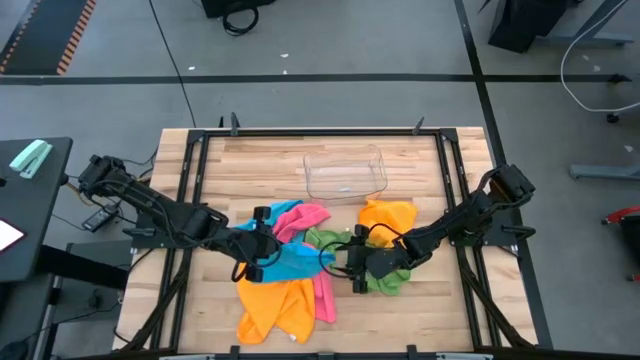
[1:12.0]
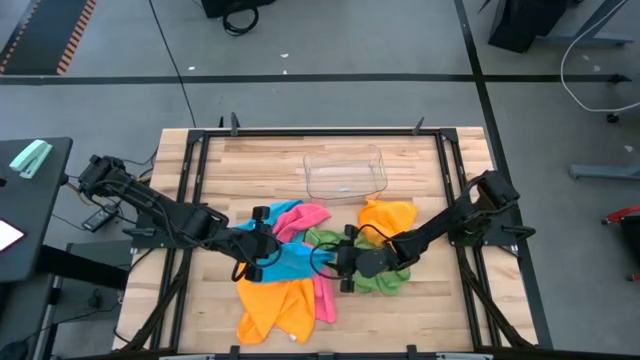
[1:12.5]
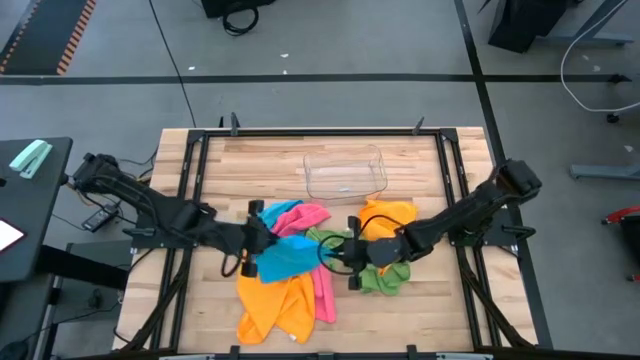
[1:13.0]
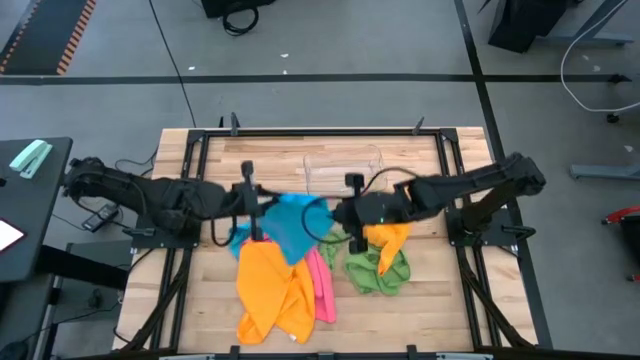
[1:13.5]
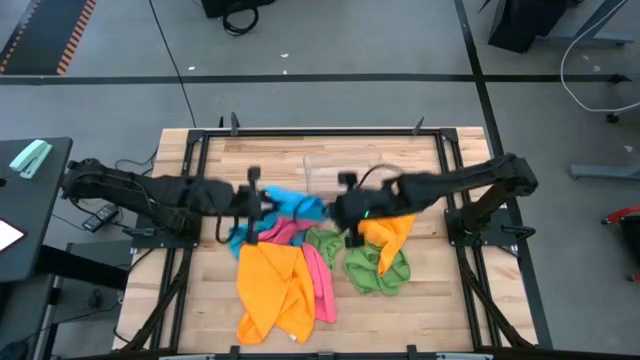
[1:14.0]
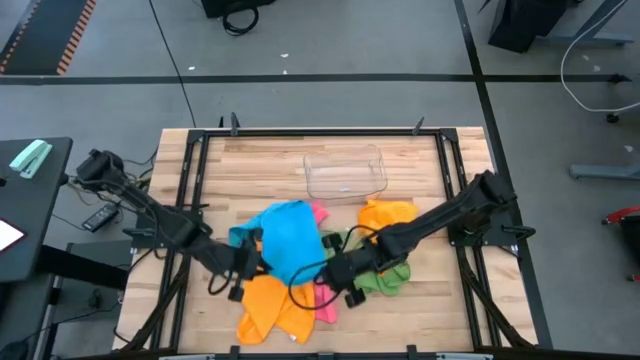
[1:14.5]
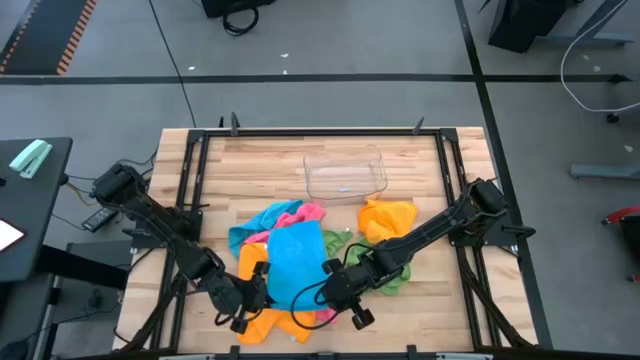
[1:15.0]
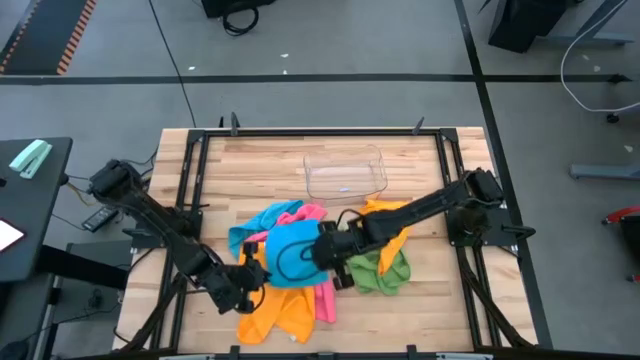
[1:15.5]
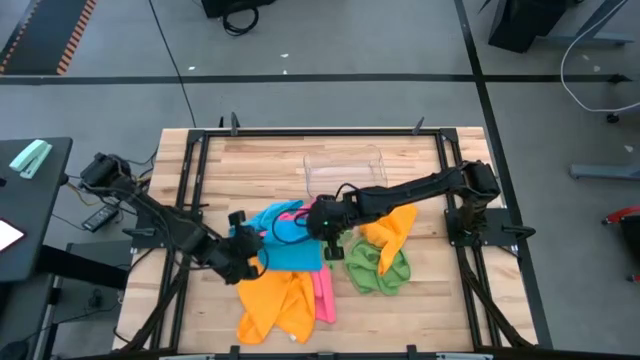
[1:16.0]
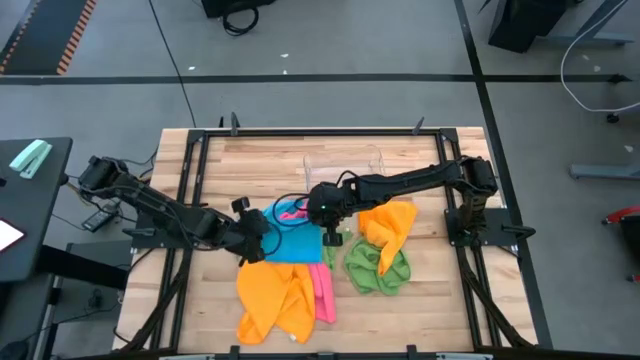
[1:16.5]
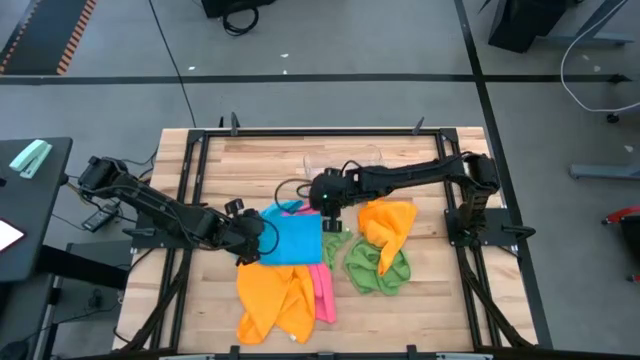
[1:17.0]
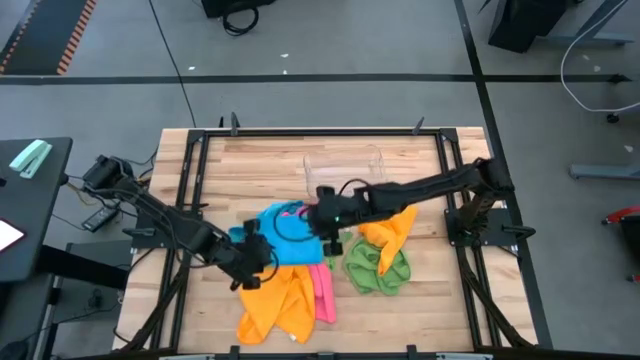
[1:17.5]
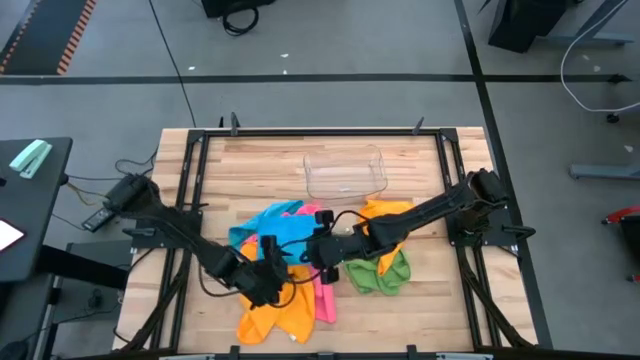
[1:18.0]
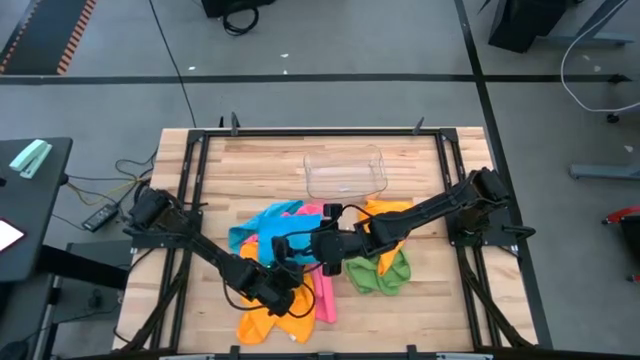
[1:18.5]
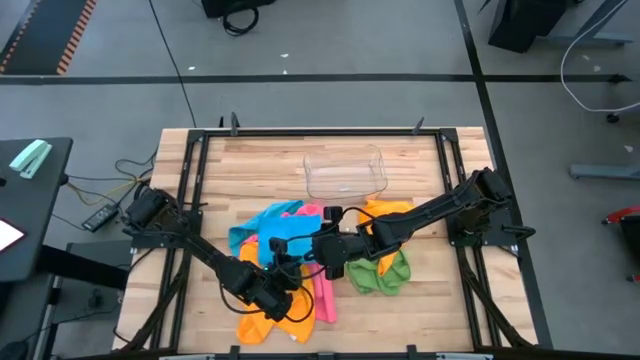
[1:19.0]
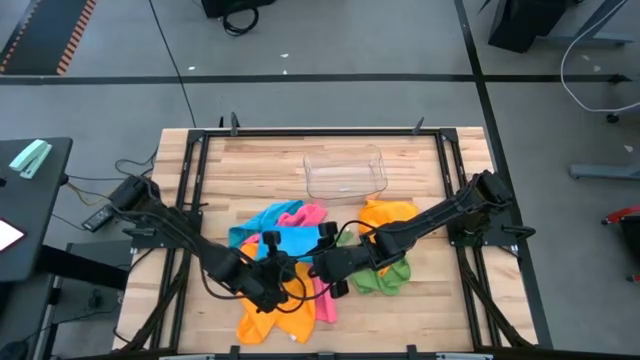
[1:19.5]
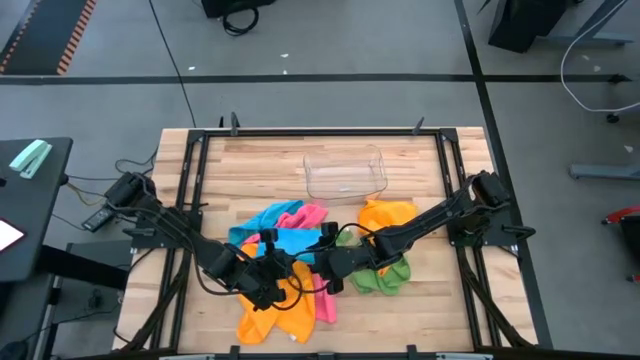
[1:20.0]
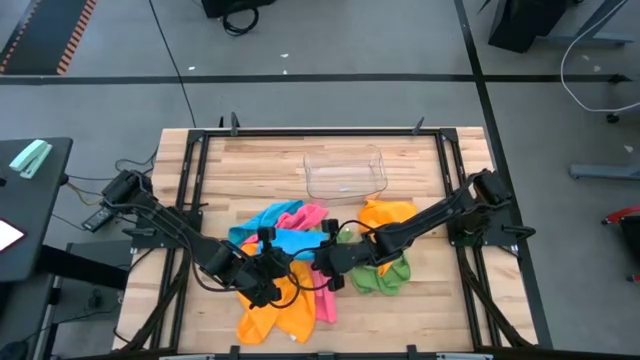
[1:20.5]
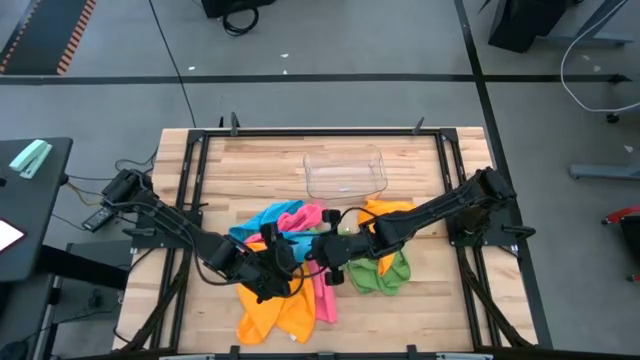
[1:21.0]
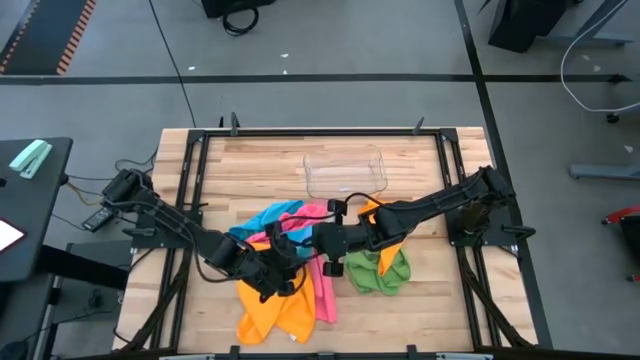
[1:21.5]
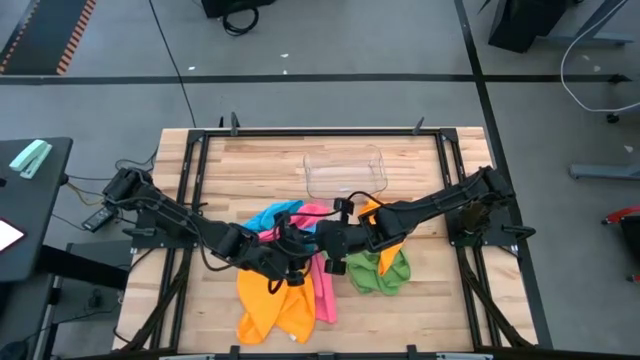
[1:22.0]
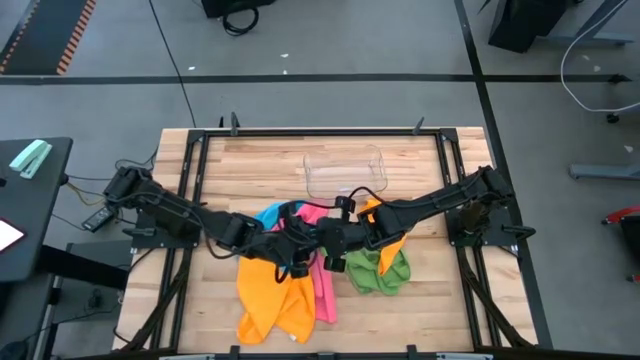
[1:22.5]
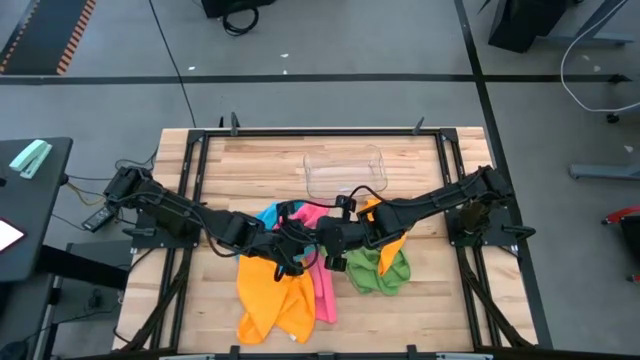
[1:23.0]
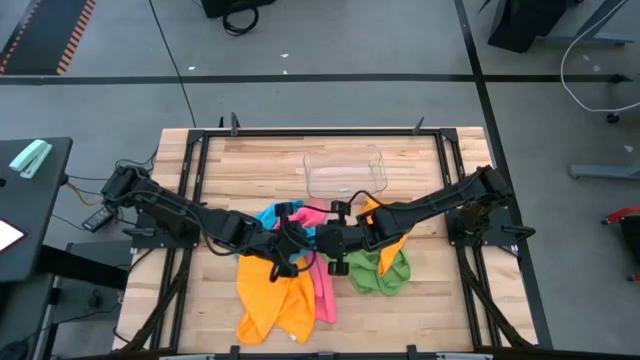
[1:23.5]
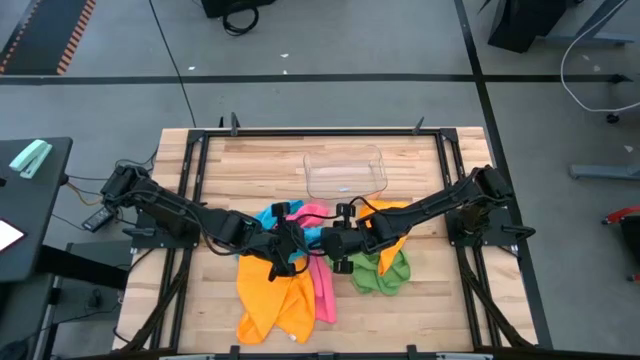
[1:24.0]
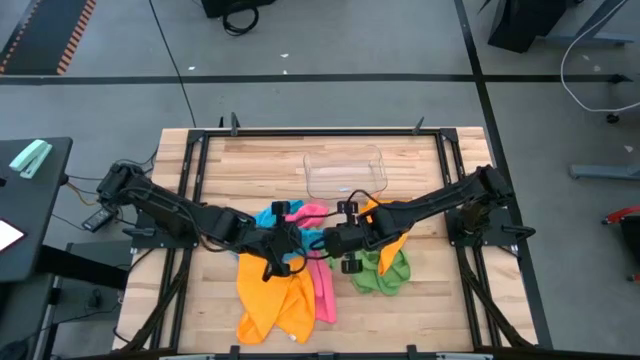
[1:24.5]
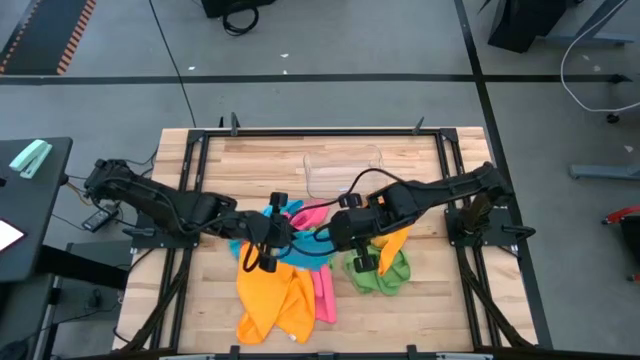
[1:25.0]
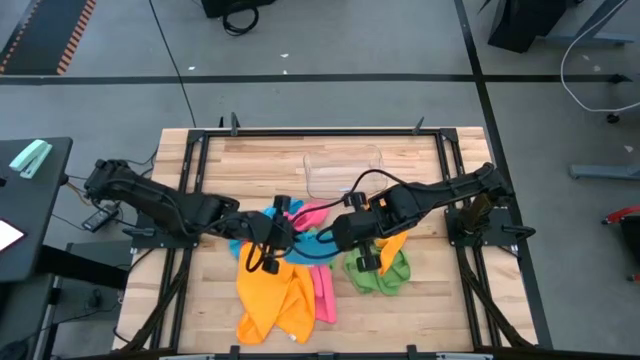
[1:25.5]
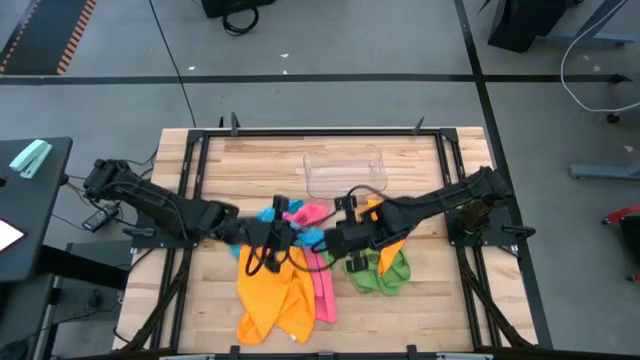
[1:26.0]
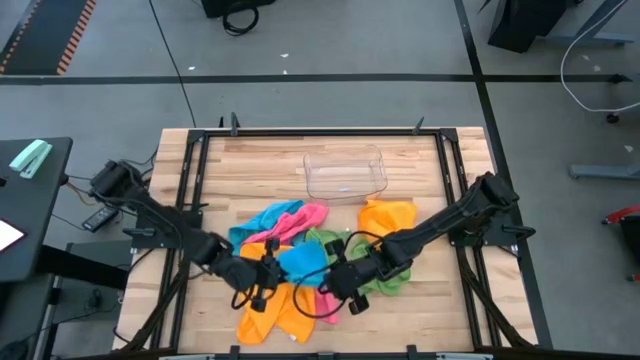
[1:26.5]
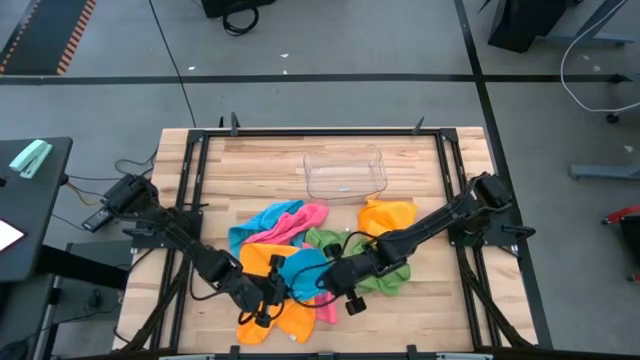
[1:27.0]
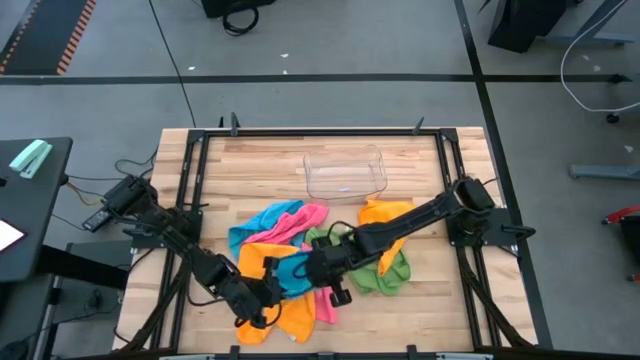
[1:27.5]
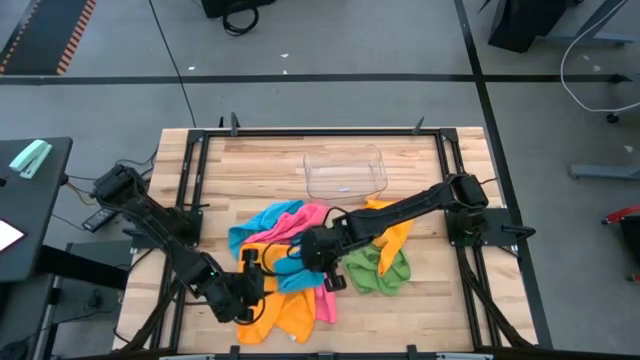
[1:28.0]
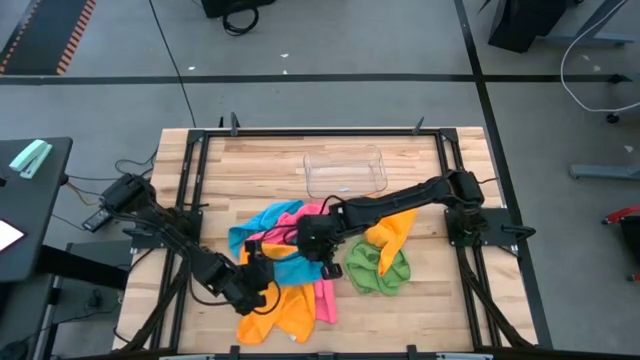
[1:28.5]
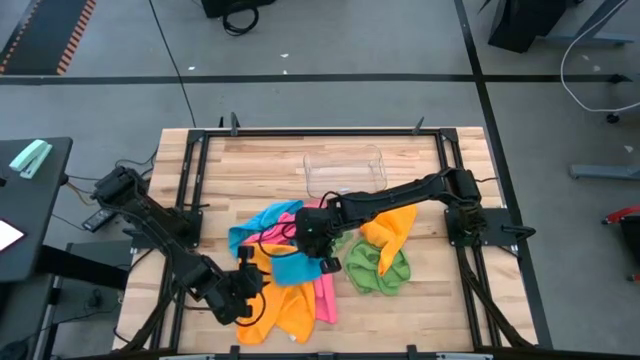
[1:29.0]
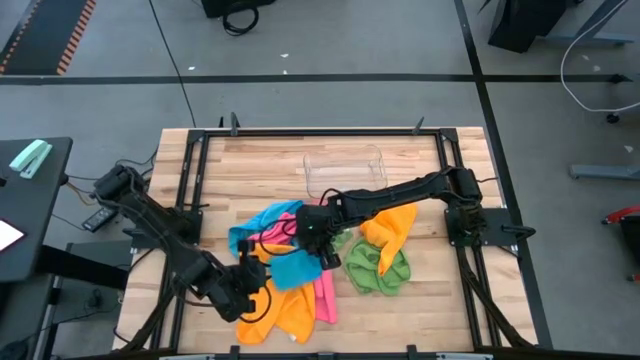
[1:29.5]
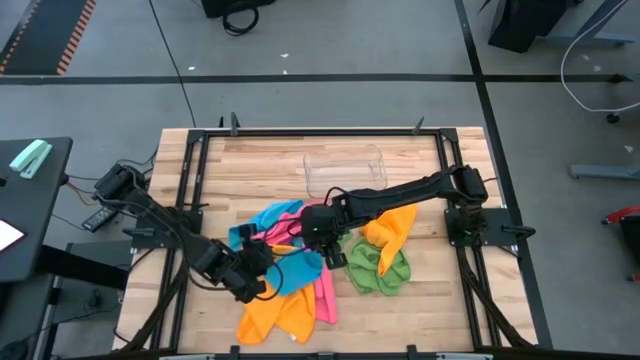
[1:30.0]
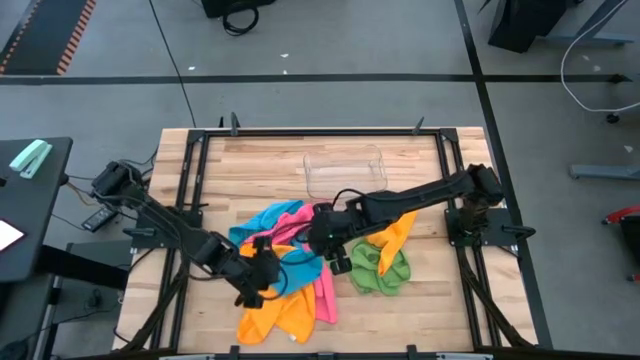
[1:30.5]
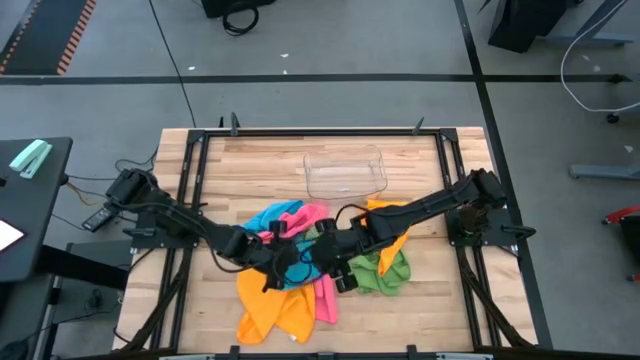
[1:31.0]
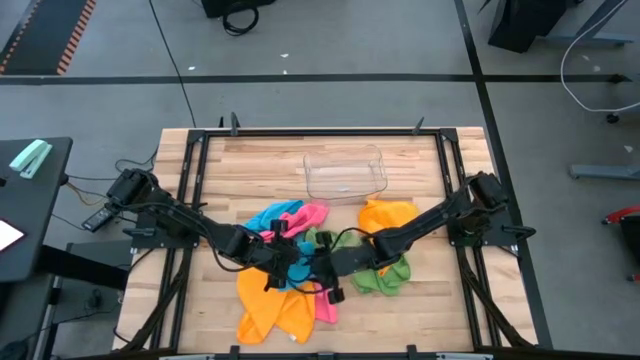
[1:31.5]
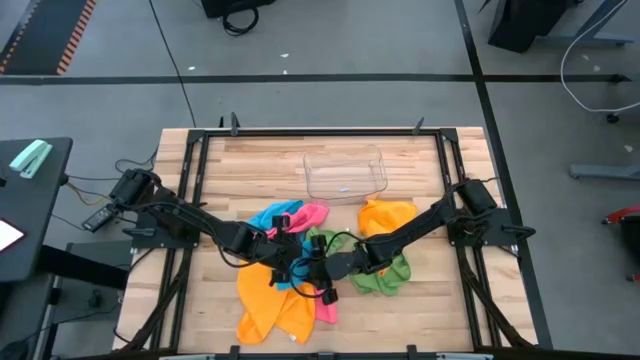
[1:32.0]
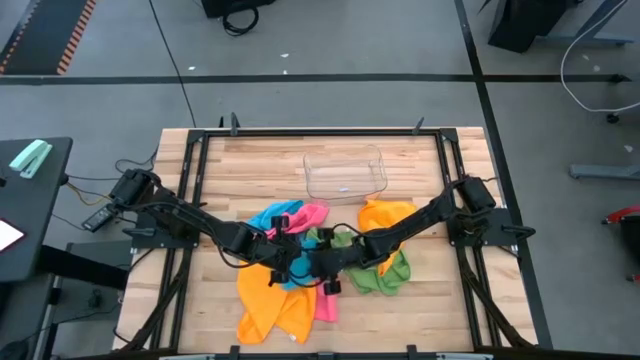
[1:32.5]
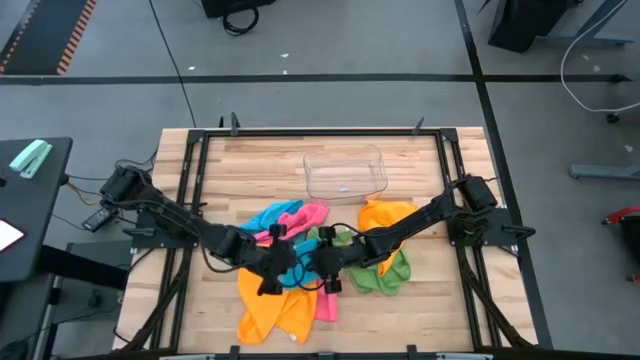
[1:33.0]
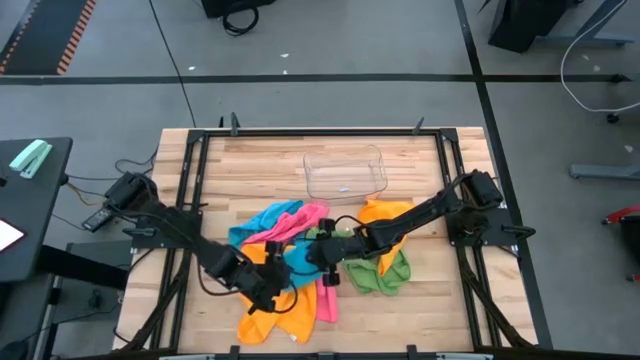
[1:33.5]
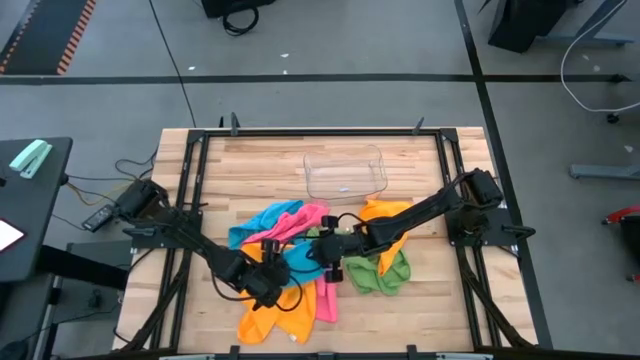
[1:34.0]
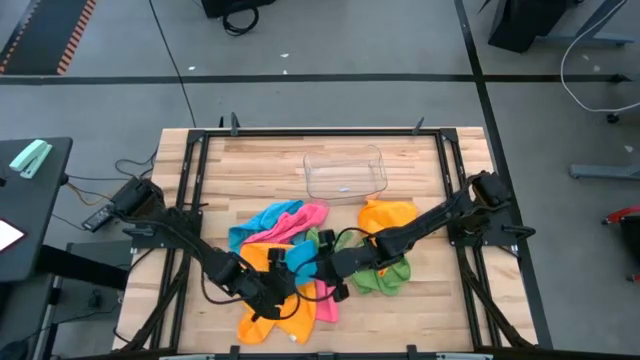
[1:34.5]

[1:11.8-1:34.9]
Task: Fold microfiber towels
Fold the bottom blue microfiber cloth
